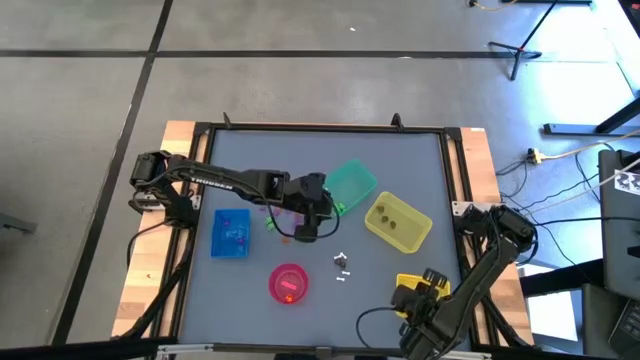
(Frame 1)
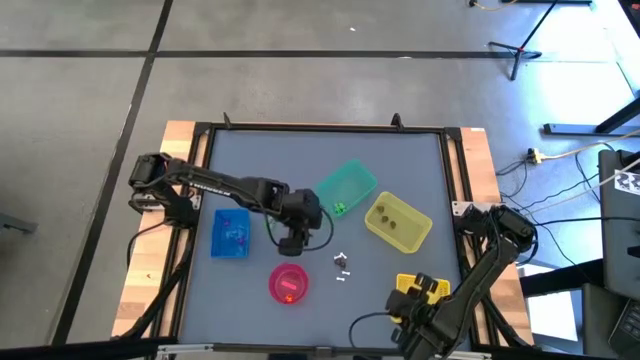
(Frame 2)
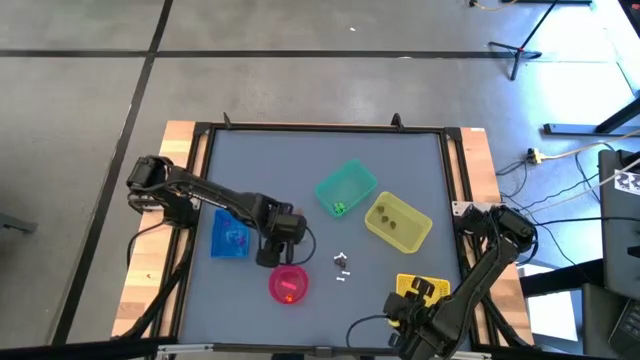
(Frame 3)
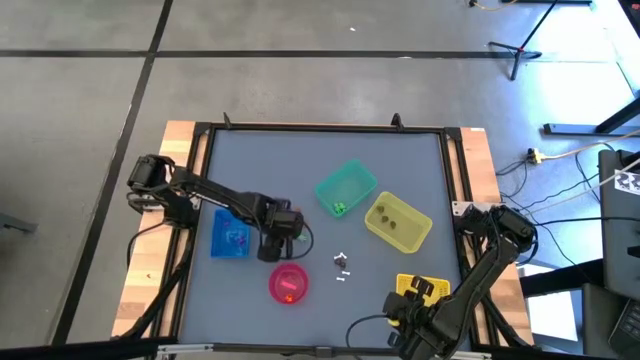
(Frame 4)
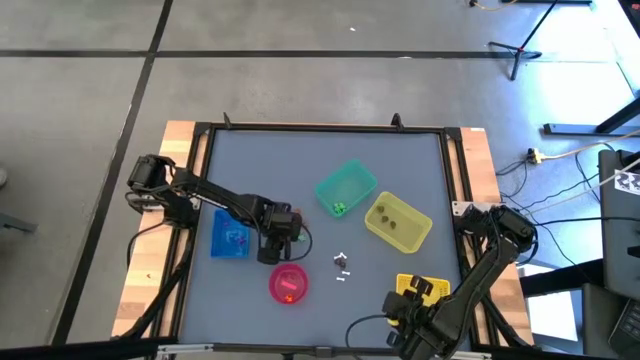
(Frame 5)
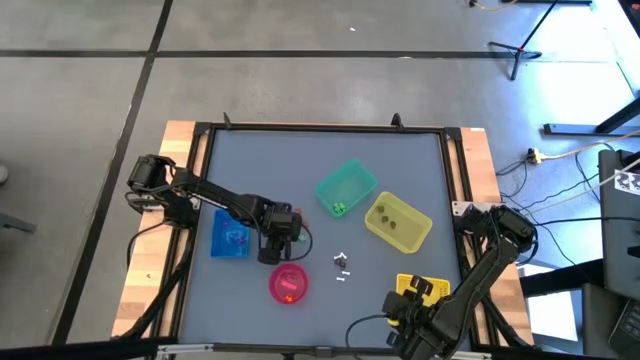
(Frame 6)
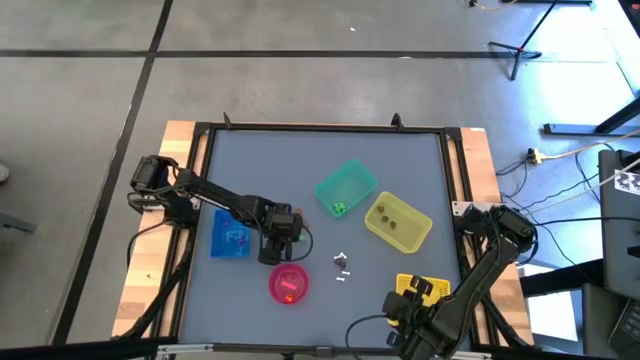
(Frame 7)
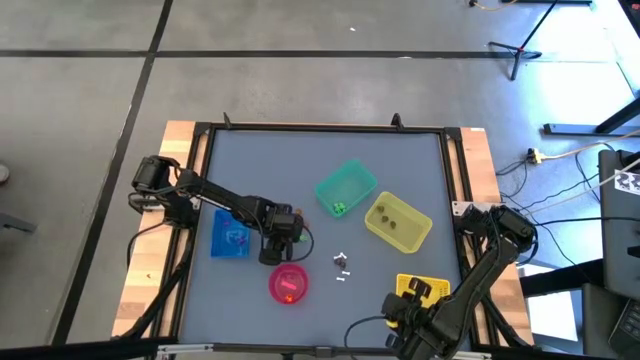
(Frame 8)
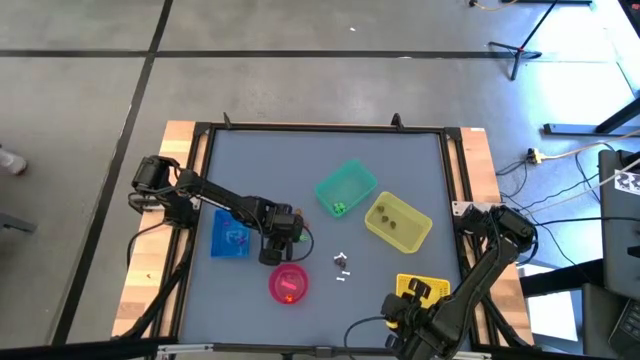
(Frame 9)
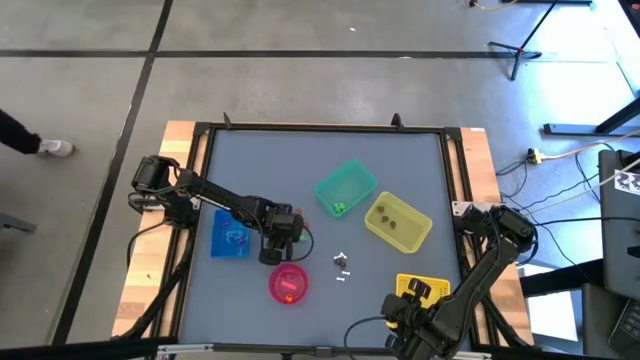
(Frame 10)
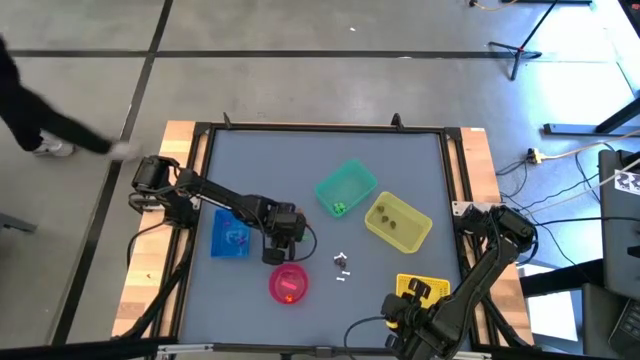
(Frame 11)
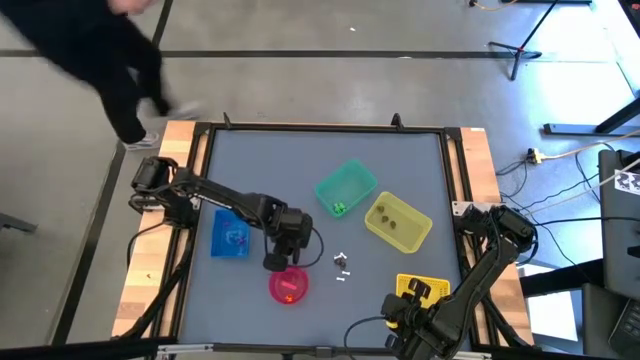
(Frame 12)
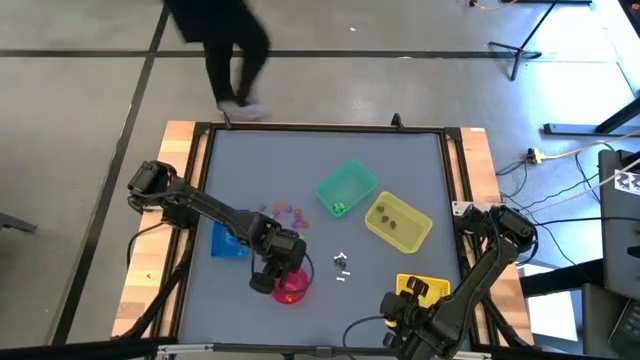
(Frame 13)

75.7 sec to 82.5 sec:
Task: Sort Halloween decoration
Put the orange pumpkin toy into the pink bowl

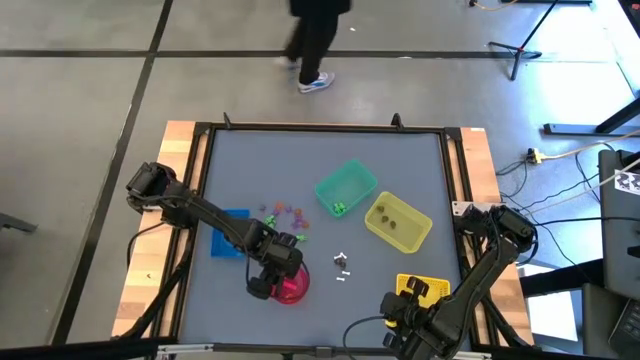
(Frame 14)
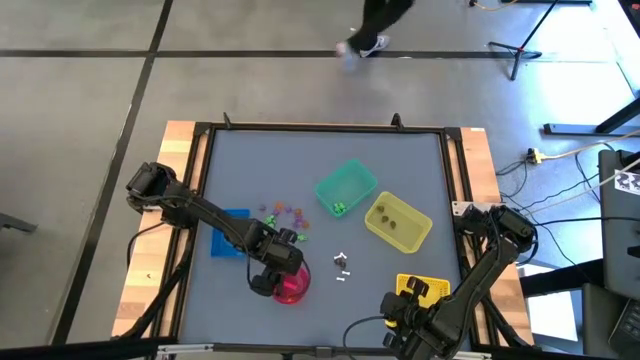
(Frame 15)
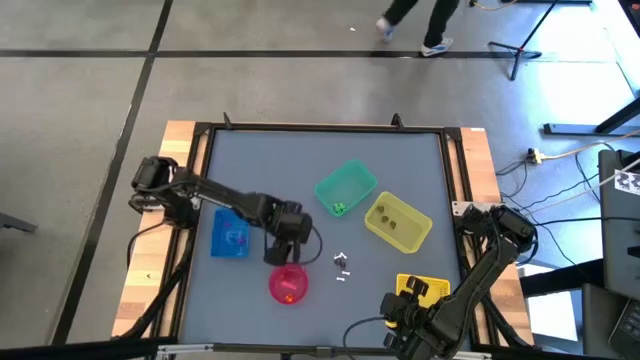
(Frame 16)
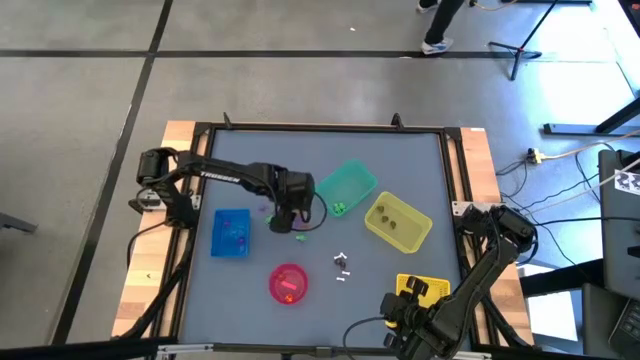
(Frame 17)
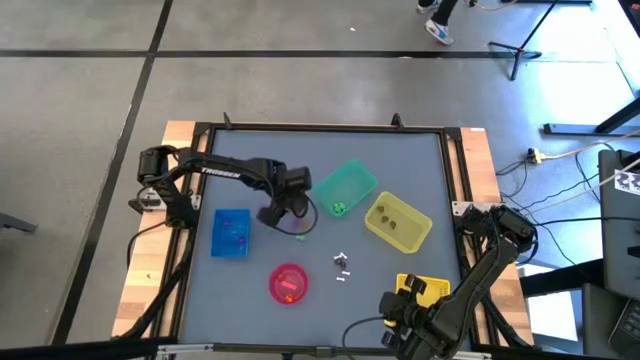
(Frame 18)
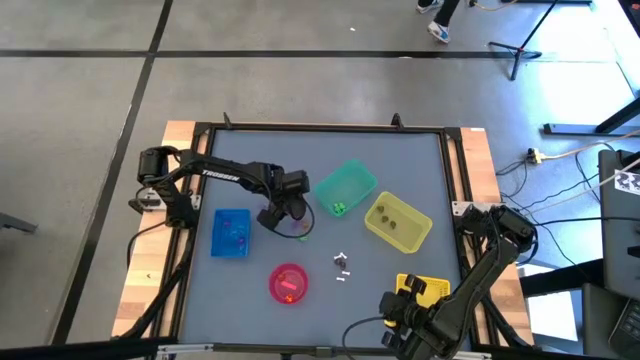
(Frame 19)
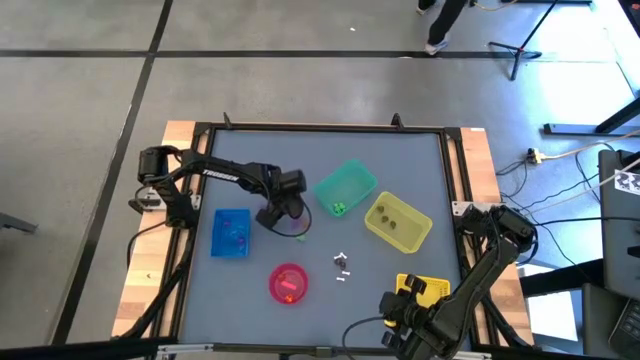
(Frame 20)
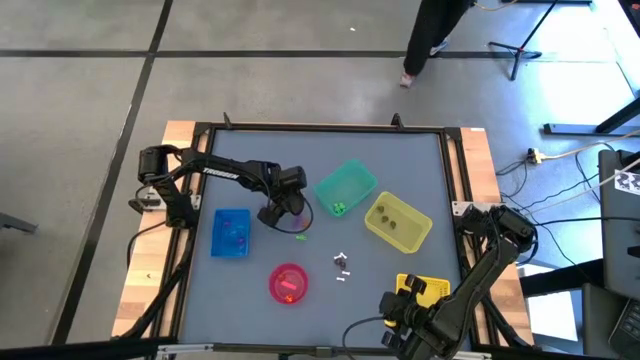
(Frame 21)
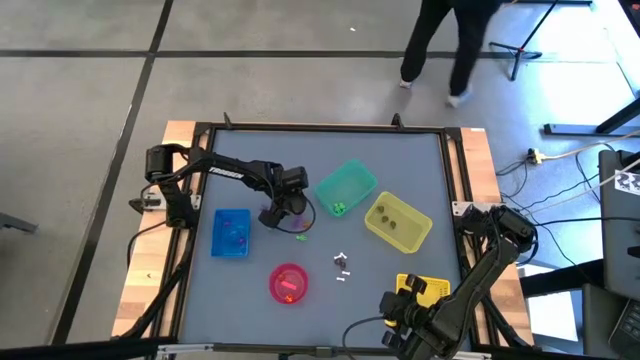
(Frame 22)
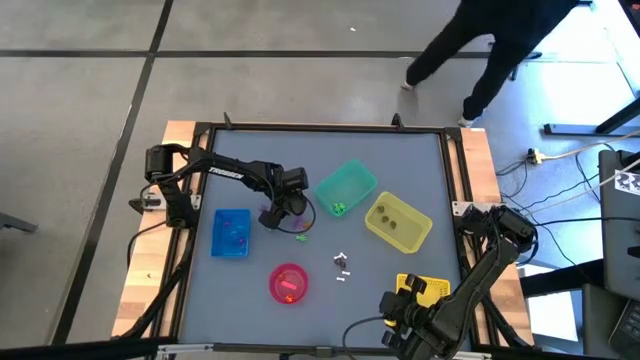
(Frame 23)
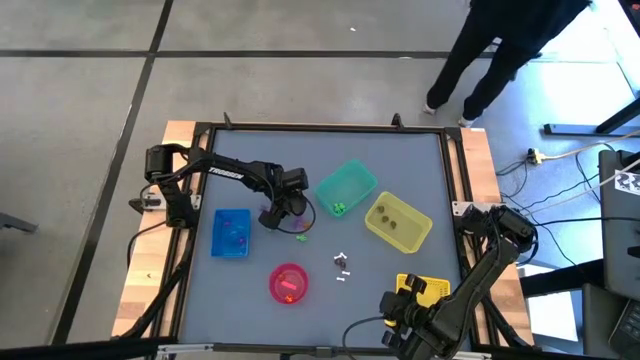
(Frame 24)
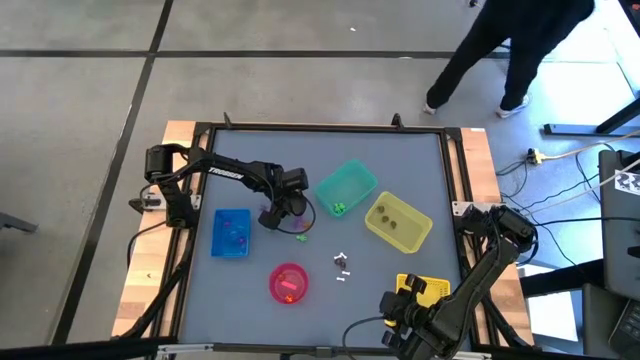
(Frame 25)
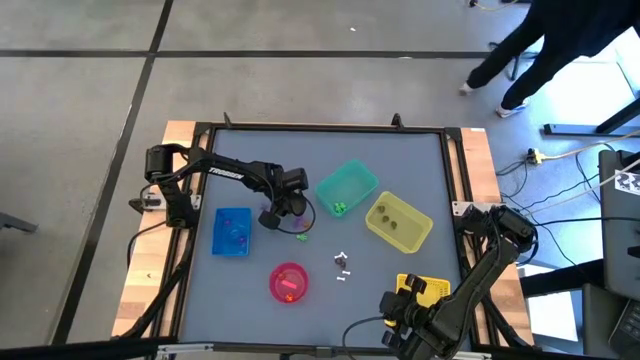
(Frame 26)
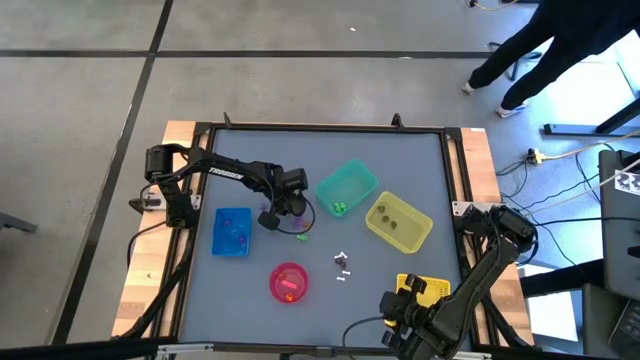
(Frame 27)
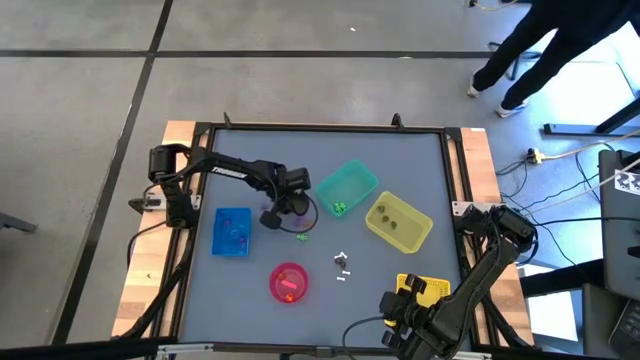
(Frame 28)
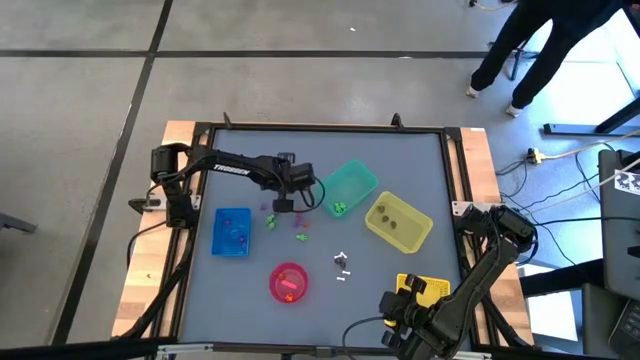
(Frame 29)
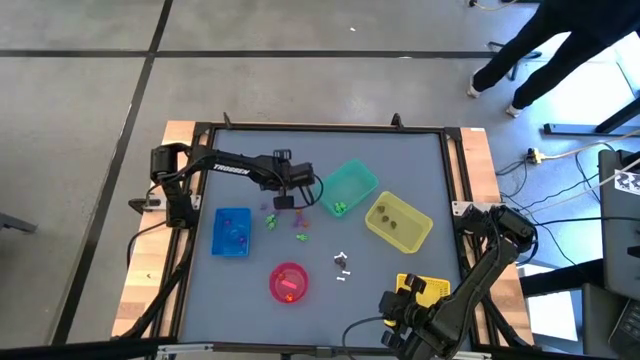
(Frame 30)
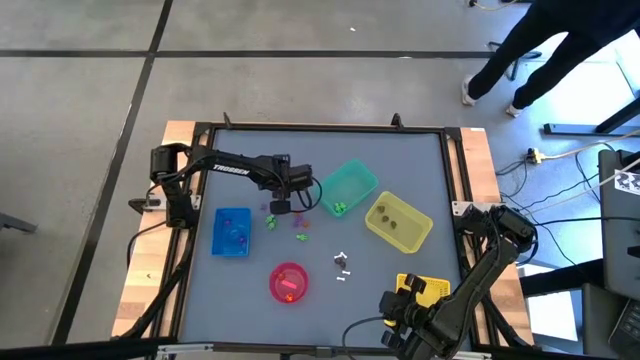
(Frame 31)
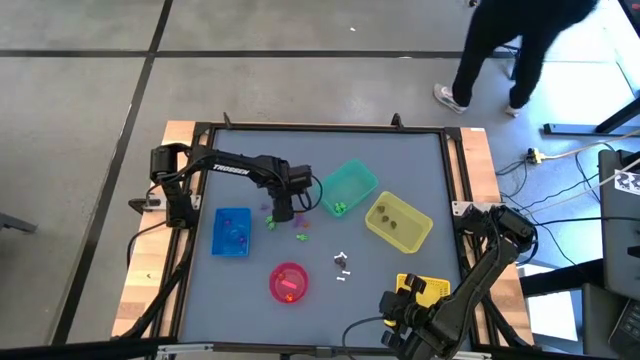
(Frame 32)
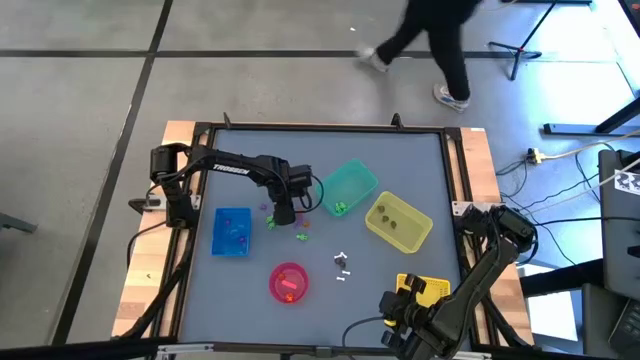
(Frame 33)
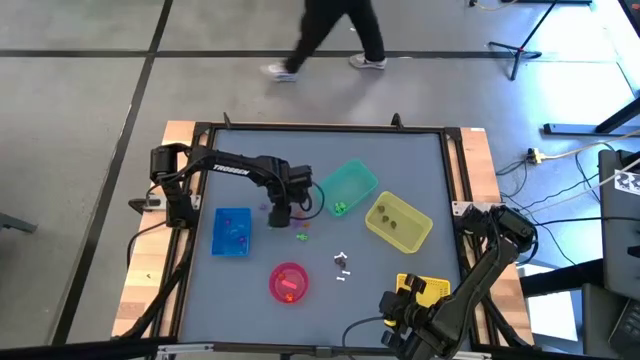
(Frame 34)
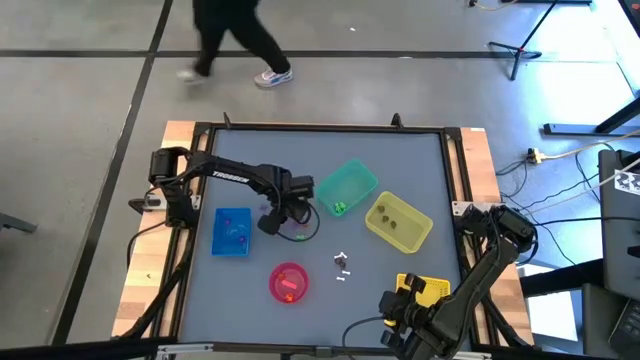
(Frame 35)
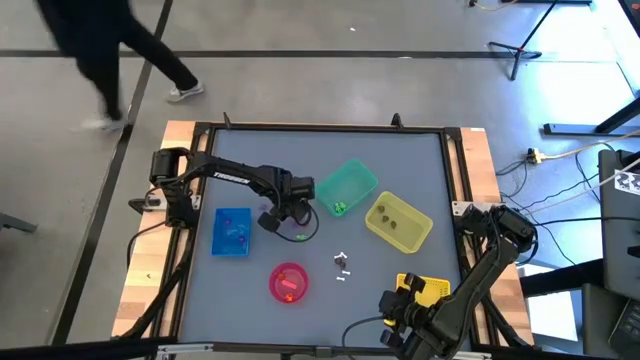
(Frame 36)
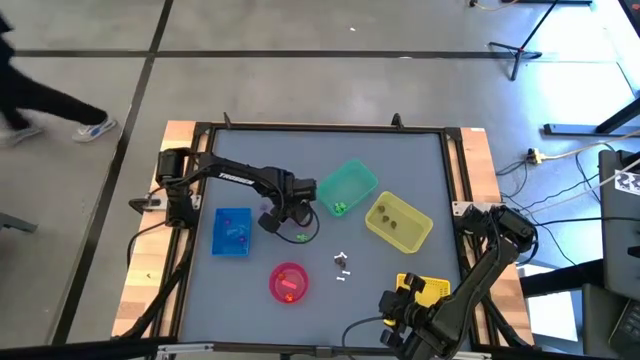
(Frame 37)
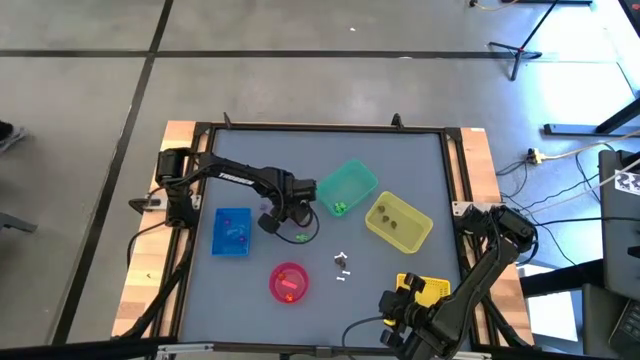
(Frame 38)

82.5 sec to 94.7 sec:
Put the violet spider toy into the blue bin

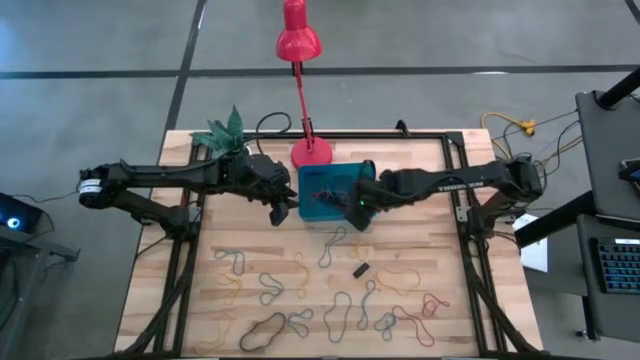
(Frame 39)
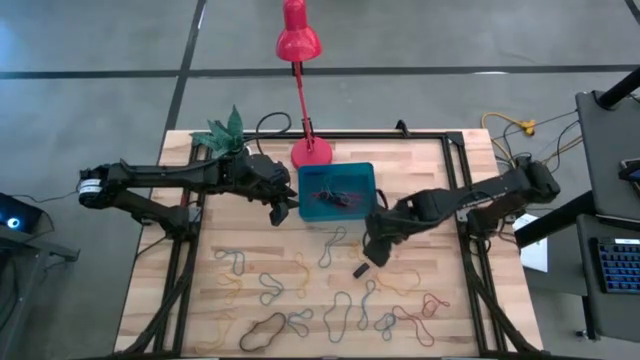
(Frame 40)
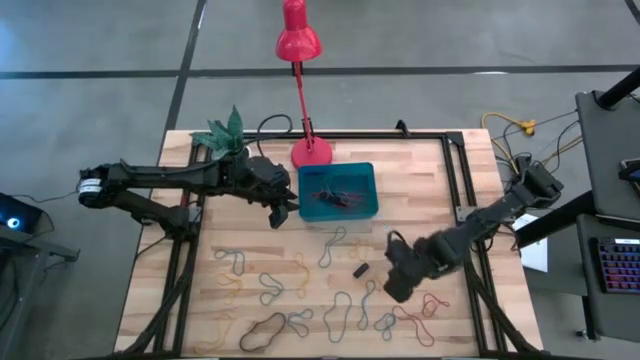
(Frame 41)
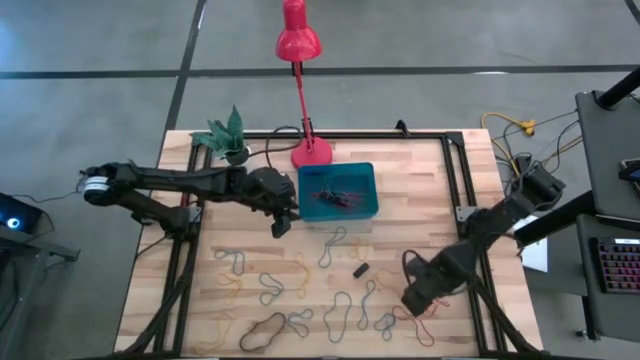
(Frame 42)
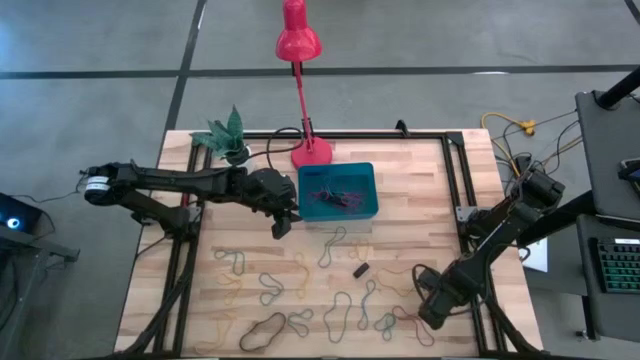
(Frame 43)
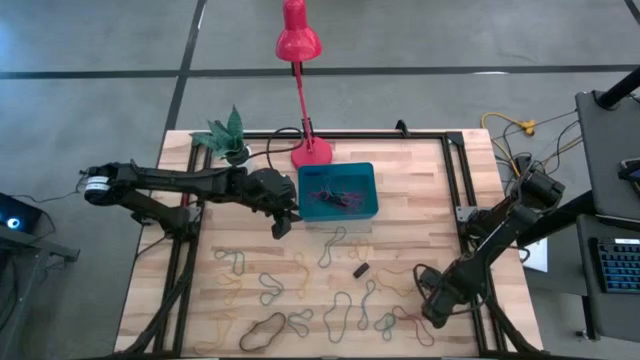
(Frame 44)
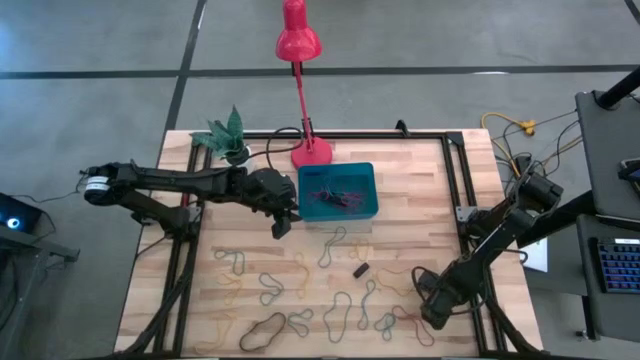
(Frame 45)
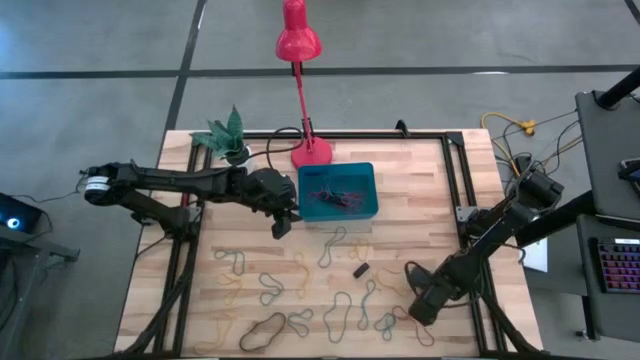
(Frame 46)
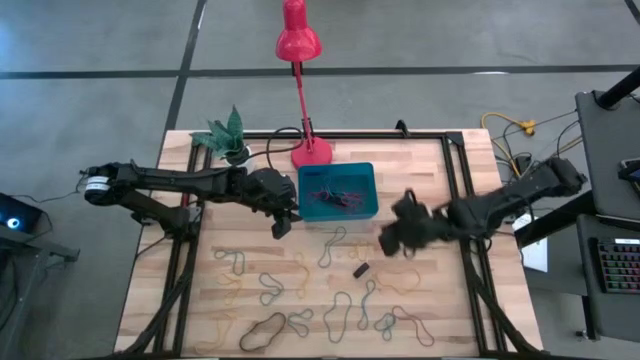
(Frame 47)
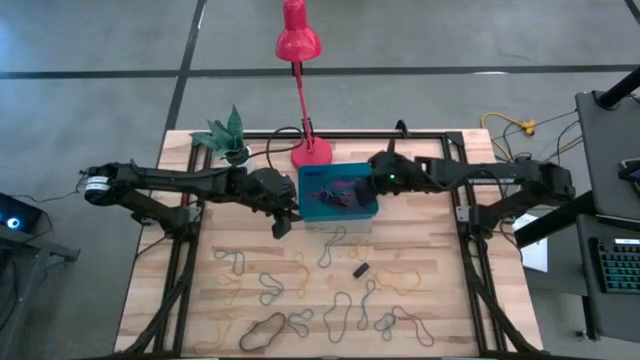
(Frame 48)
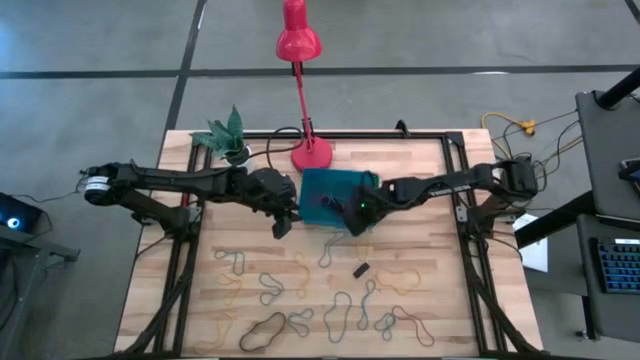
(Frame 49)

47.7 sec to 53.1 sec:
Task: Pick and place rubber bands into bin
Put the red rubber band into the blue bin
